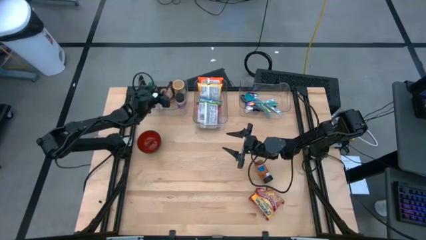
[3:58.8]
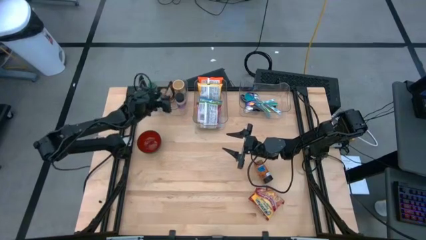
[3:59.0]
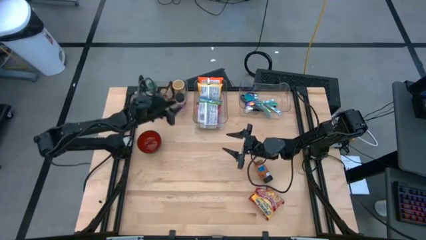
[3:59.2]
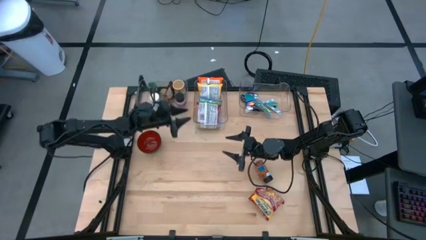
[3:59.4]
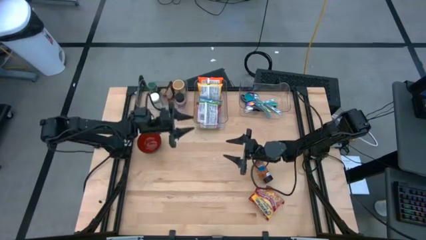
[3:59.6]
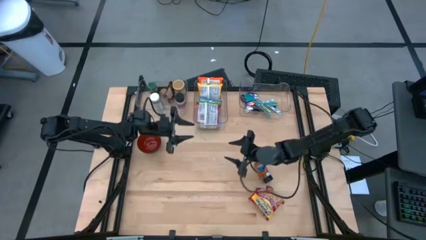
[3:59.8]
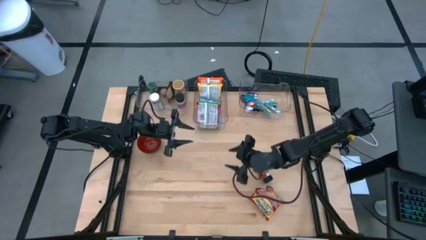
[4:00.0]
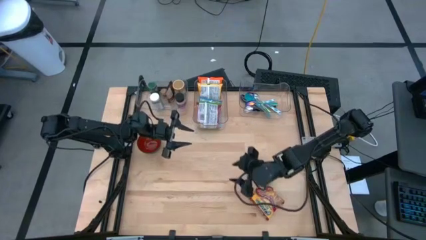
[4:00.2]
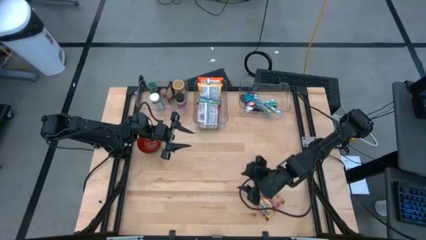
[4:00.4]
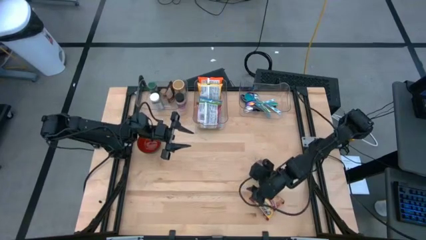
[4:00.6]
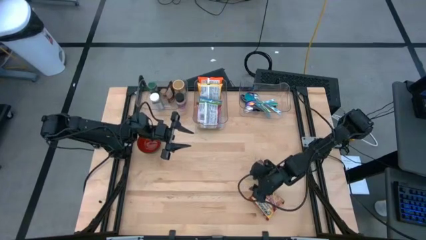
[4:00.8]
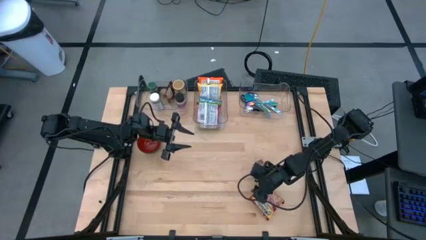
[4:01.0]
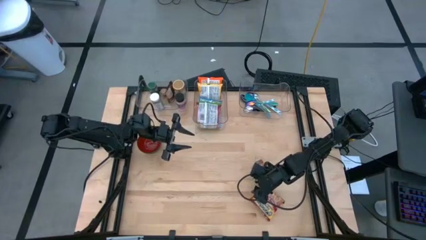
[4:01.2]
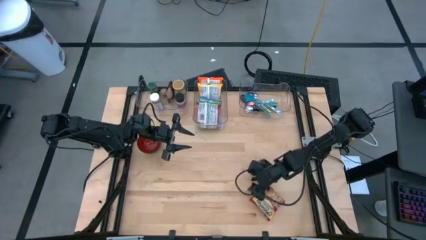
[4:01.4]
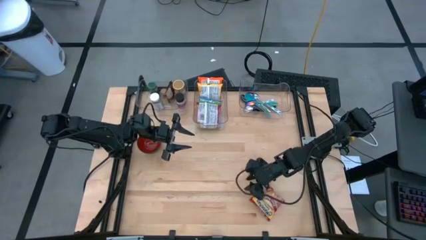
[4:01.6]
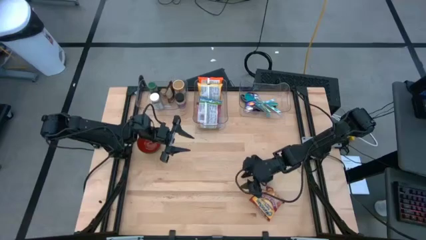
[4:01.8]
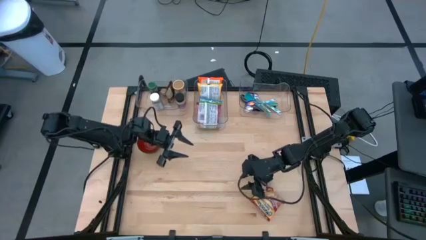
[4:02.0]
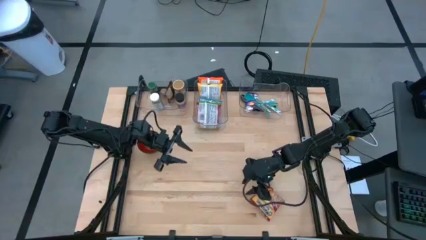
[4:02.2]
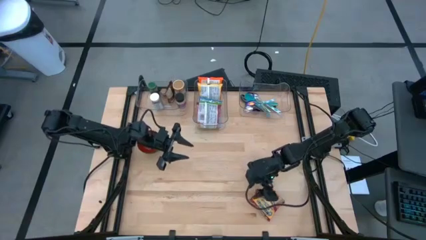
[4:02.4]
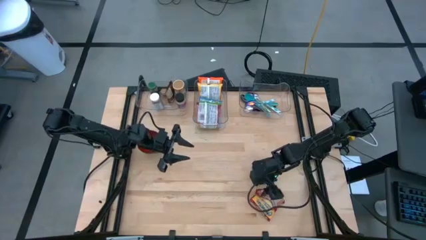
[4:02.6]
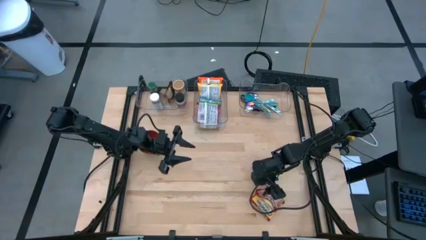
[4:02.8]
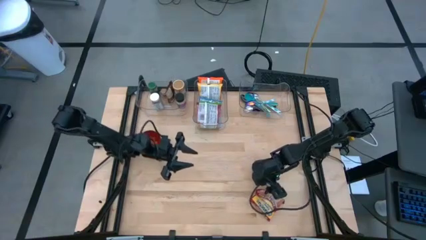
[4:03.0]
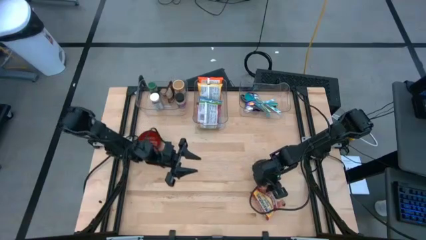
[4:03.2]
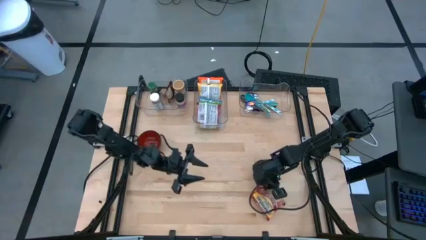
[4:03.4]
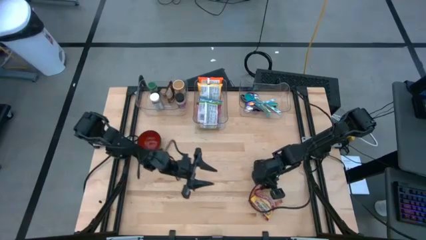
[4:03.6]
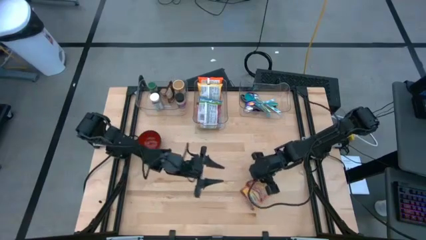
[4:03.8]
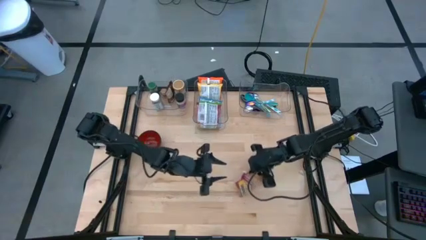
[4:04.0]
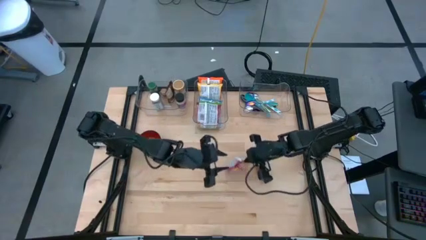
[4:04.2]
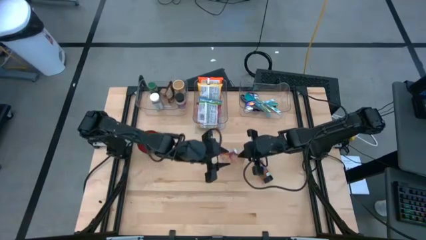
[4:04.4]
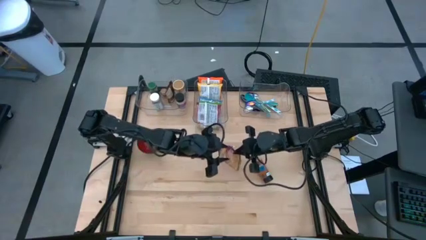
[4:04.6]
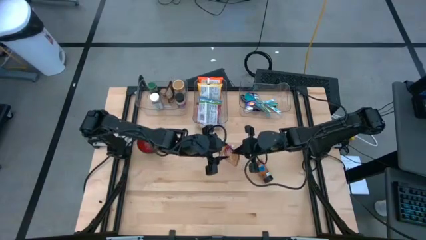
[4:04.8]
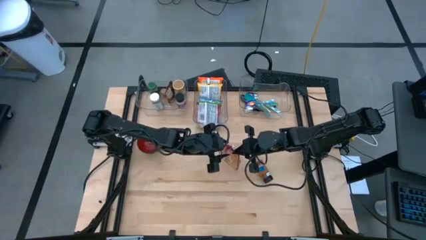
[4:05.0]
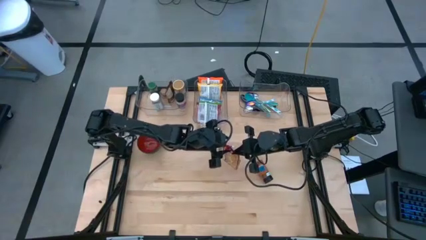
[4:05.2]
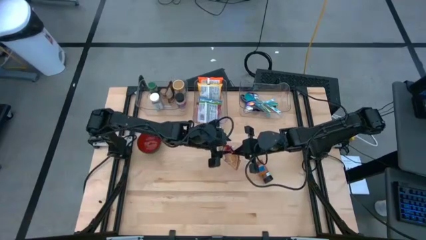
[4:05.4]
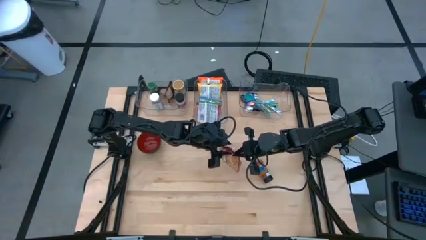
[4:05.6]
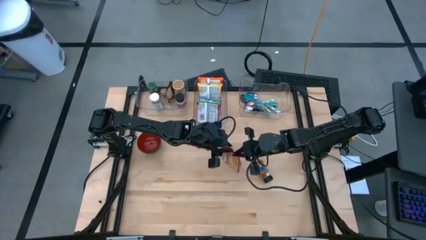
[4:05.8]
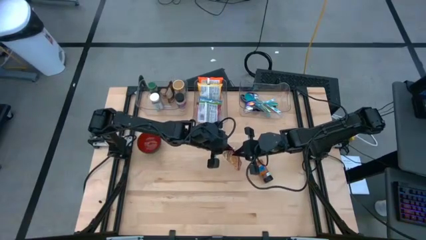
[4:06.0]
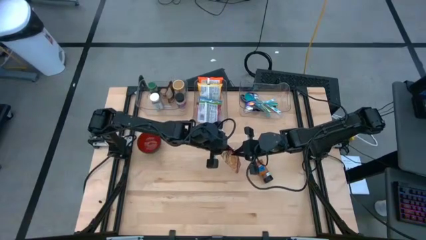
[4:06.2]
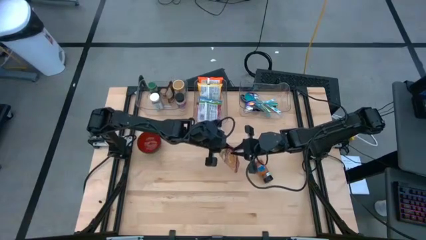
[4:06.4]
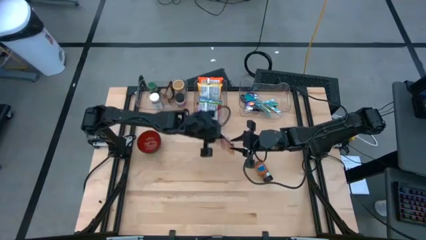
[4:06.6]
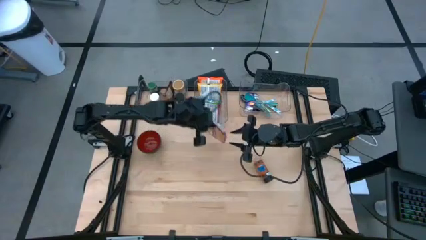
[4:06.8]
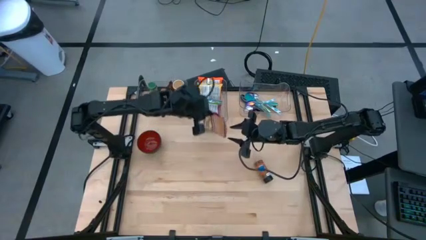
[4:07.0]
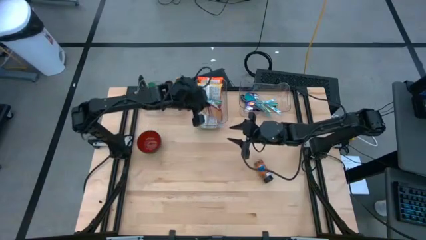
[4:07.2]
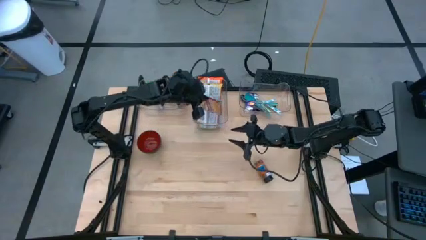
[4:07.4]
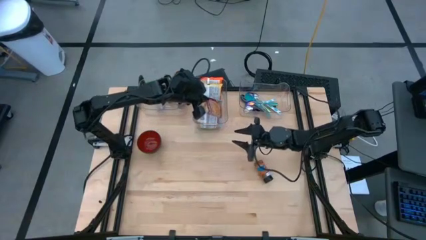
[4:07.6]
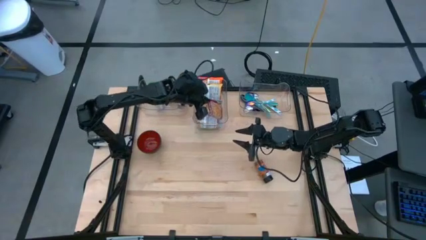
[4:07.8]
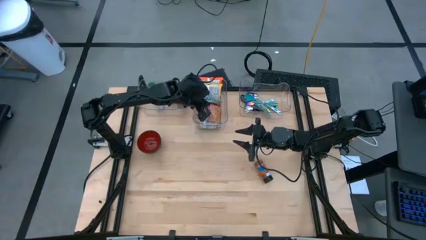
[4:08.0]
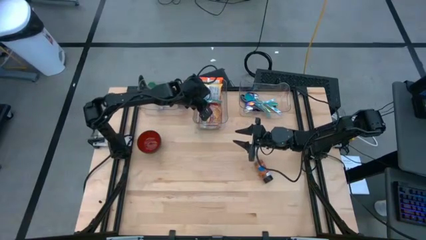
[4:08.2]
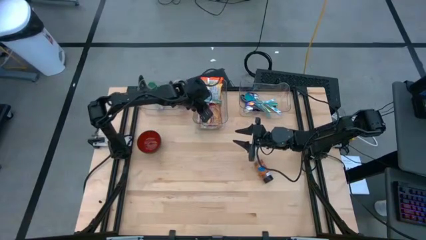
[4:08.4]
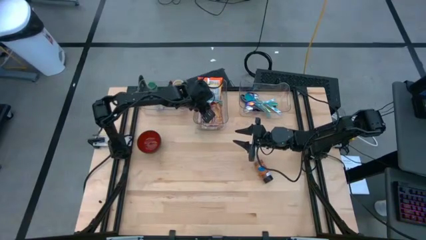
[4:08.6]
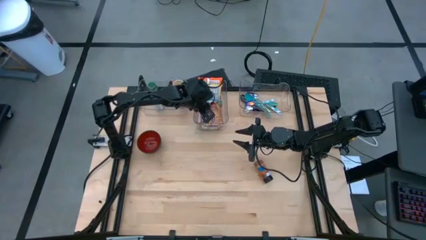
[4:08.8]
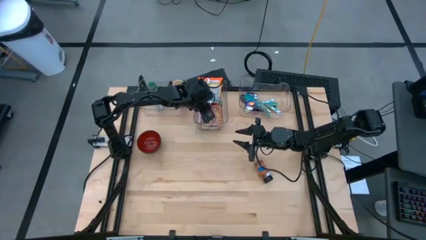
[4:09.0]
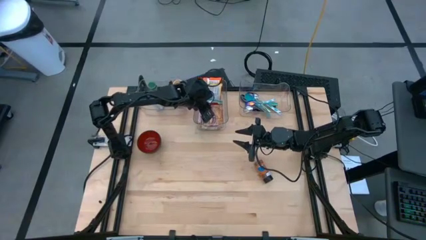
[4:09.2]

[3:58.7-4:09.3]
Task: Pick & Place Food Item
Put the red noodle pack into the middle transparent bin

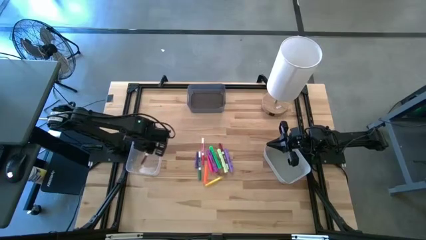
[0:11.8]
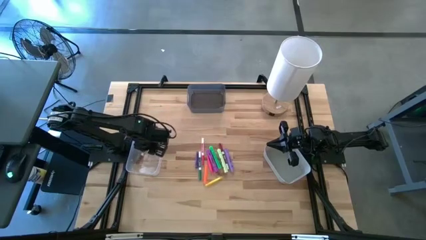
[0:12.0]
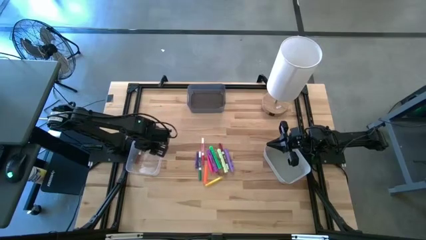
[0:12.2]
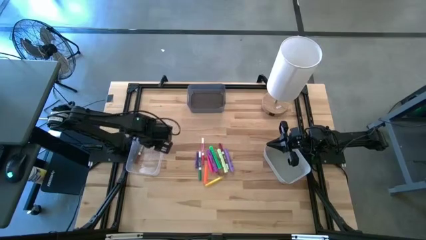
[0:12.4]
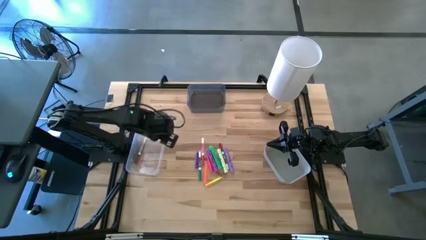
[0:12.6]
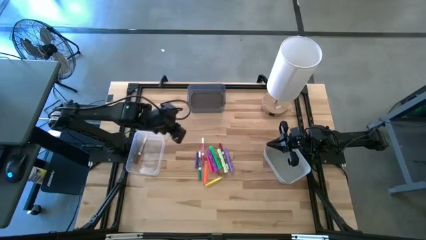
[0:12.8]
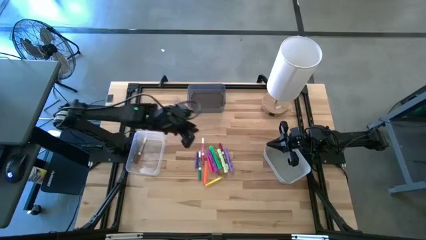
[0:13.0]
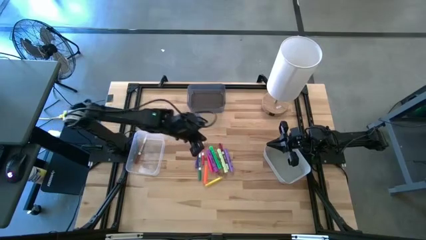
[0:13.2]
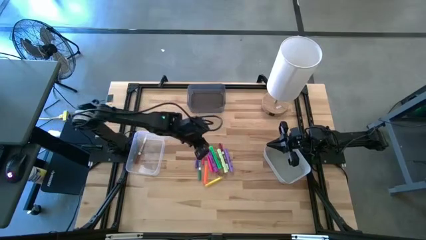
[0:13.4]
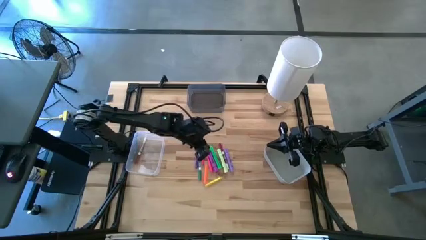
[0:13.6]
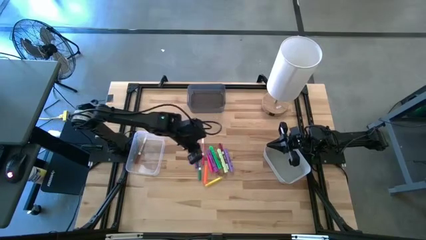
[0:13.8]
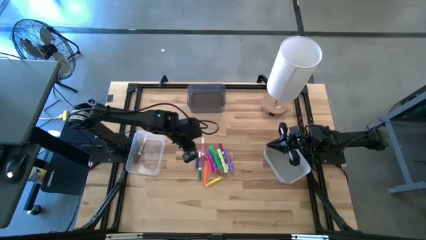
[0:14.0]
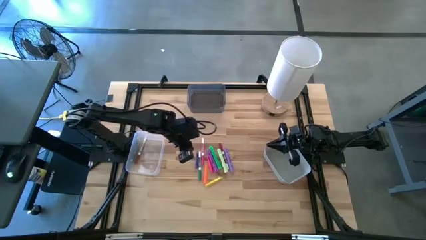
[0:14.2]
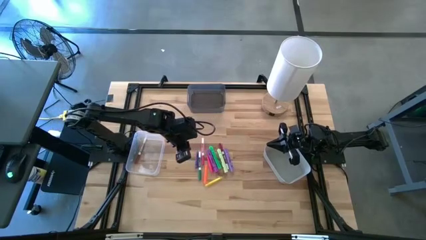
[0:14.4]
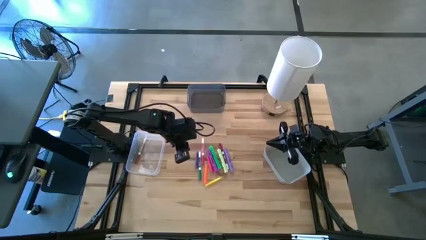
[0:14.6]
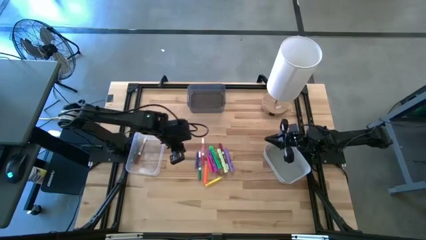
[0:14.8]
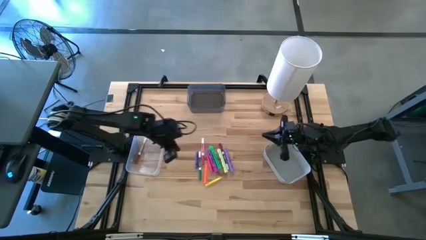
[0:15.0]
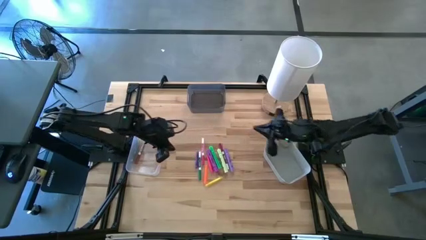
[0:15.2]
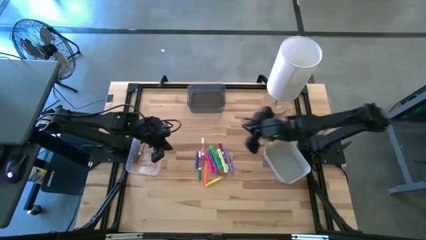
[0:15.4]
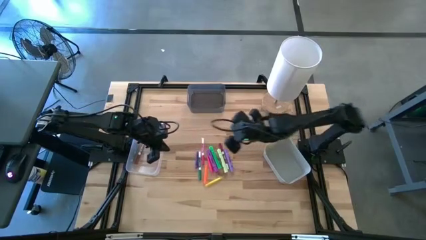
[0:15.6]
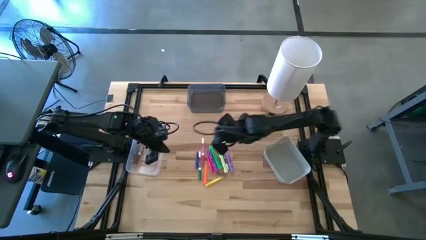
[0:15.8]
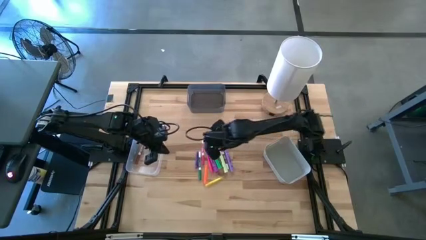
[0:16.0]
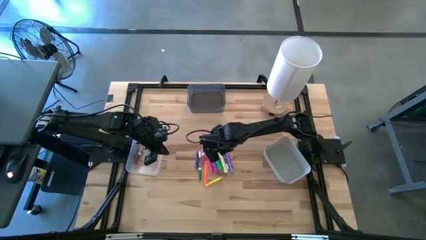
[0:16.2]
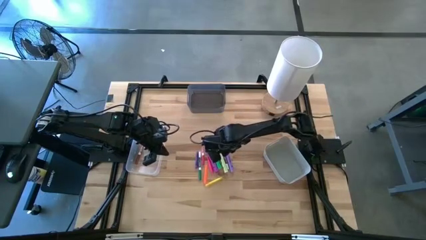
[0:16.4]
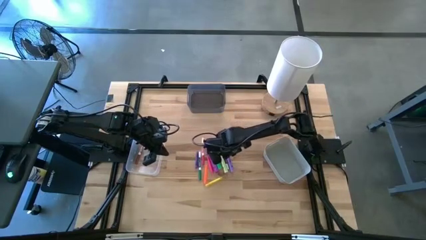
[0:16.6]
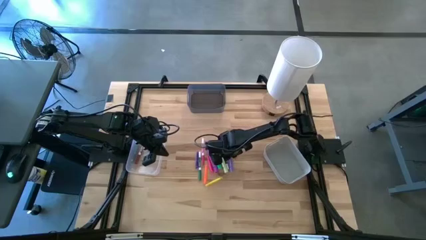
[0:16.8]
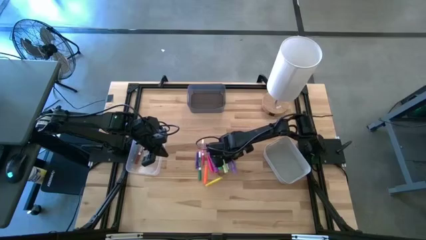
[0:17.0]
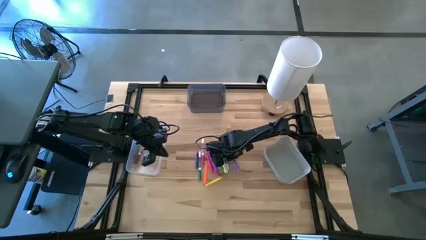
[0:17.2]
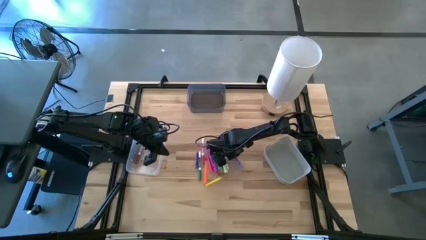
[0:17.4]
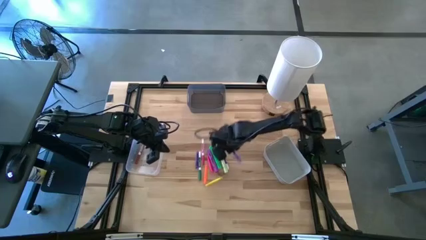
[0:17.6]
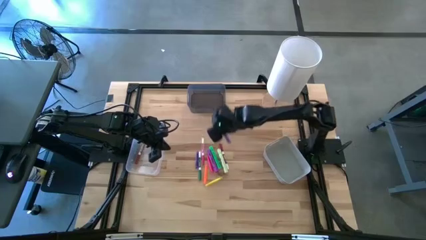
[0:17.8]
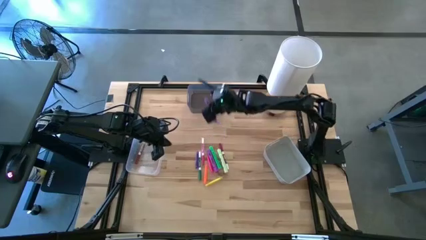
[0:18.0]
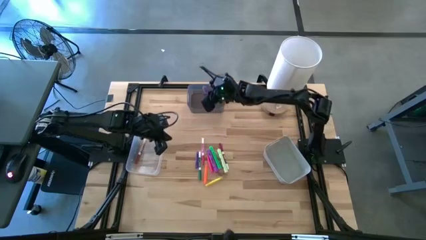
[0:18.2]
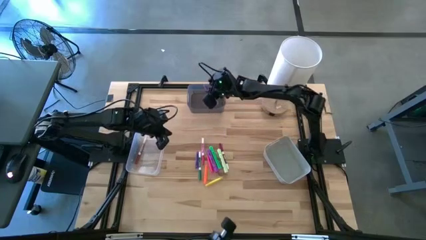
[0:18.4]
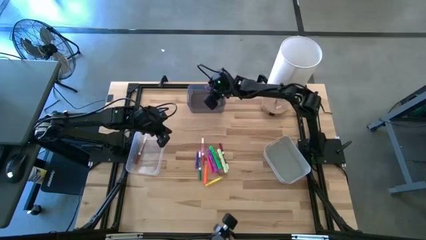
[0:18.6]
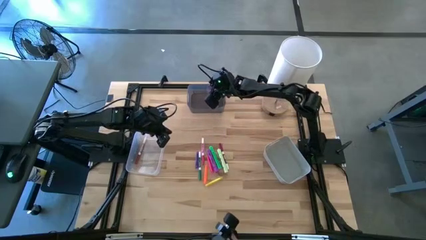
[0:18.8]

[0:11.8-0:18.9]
Task: Pick & Place Markers
Put the light blue highlighter into the black bin
